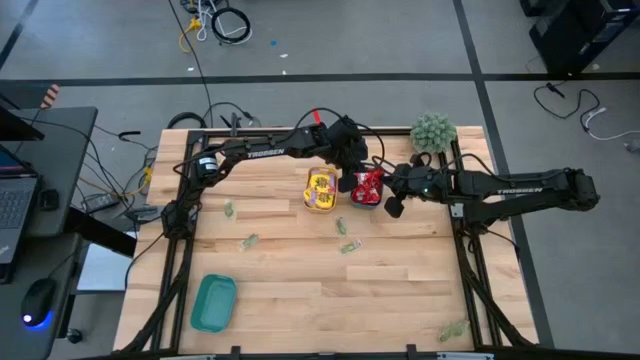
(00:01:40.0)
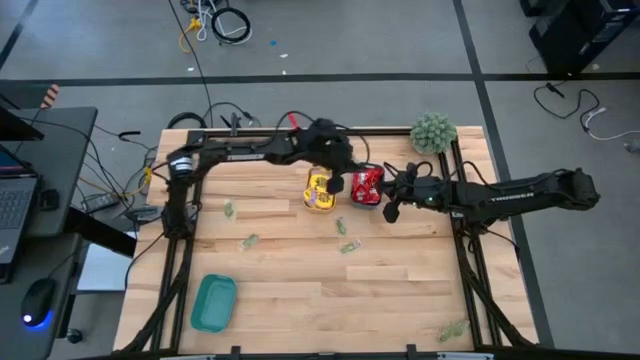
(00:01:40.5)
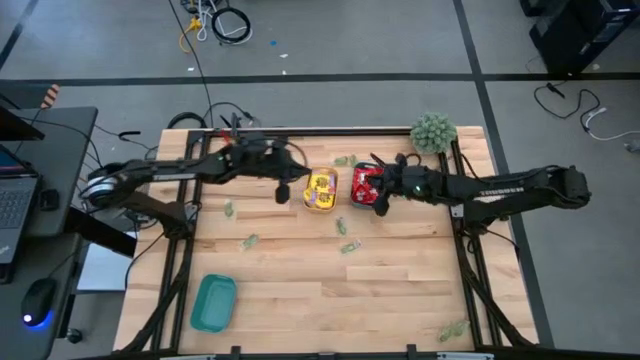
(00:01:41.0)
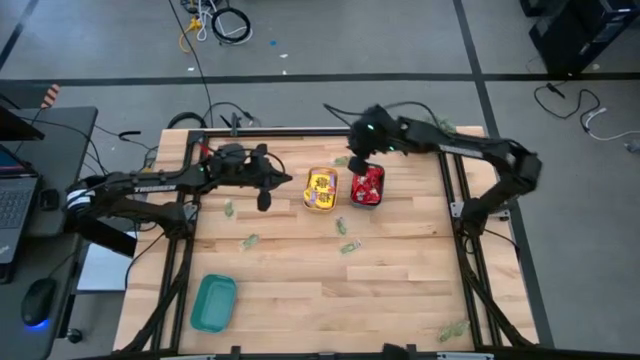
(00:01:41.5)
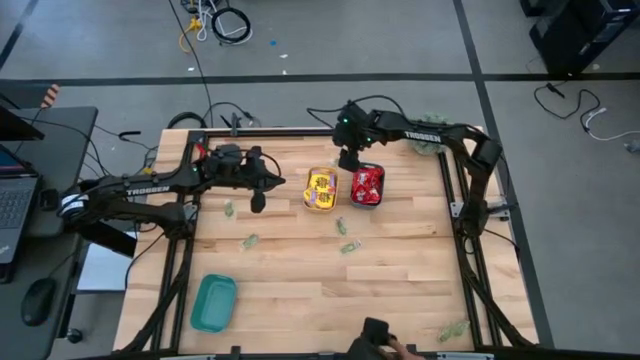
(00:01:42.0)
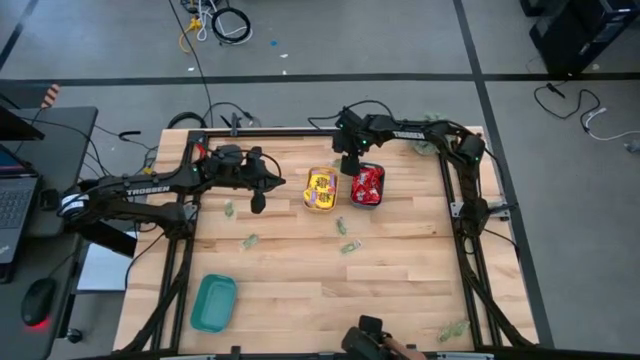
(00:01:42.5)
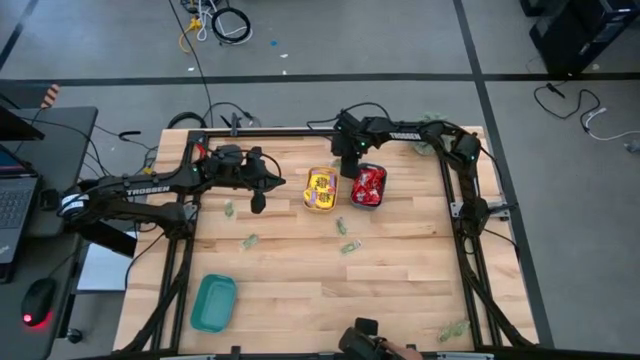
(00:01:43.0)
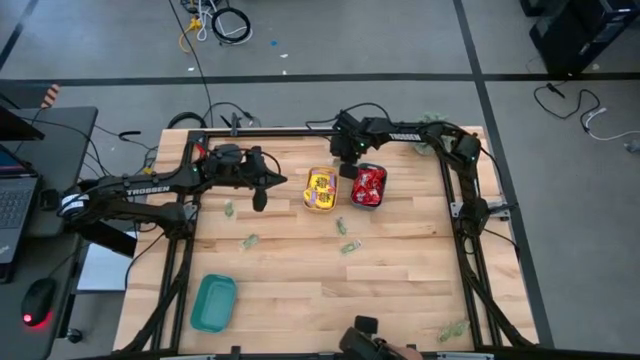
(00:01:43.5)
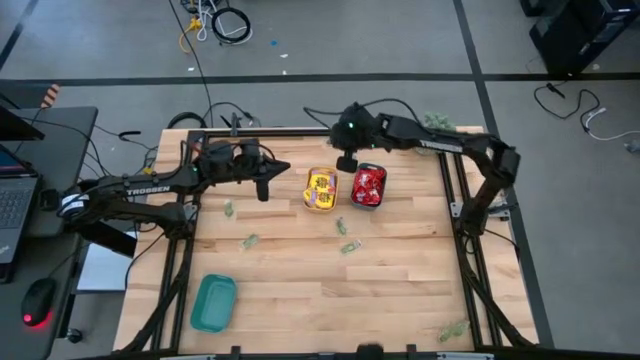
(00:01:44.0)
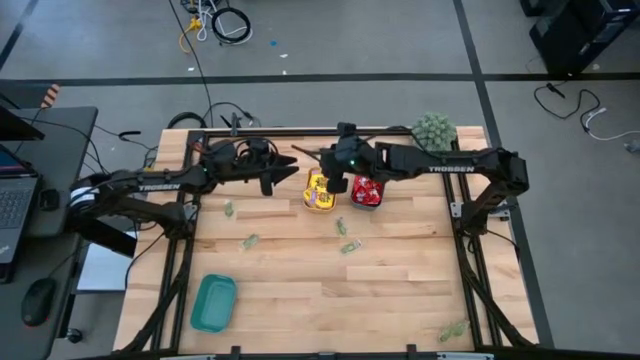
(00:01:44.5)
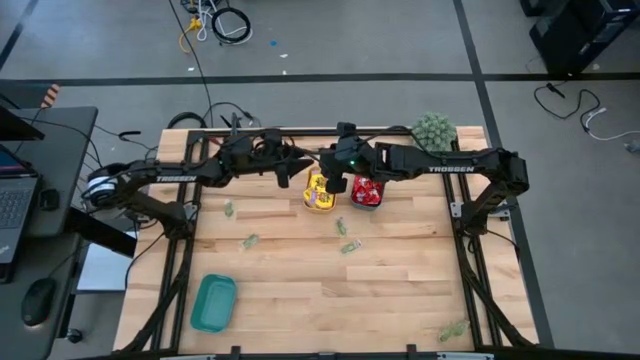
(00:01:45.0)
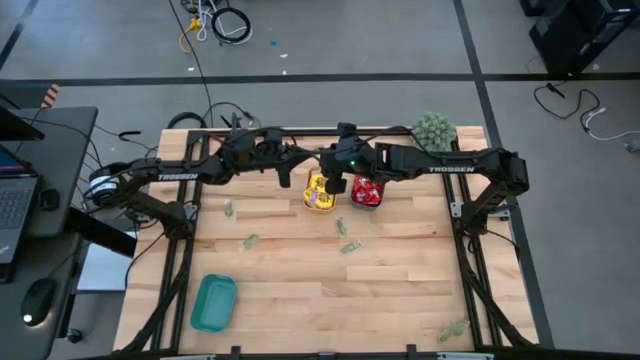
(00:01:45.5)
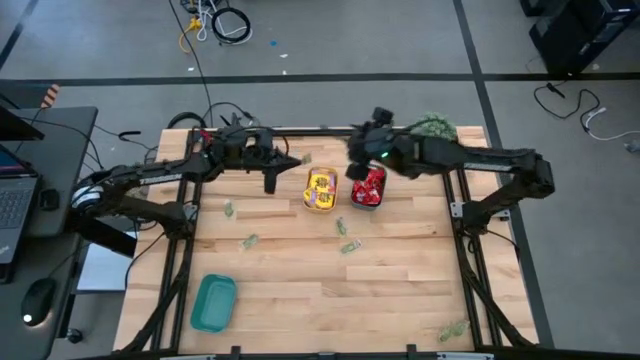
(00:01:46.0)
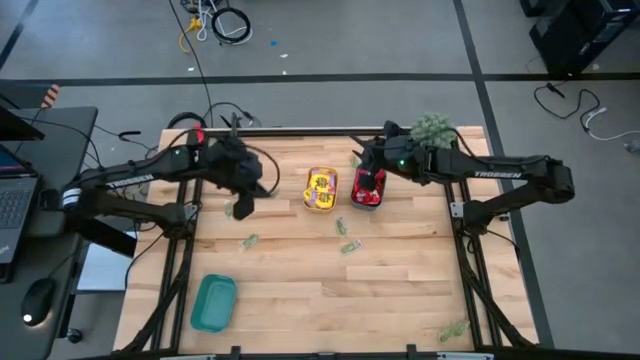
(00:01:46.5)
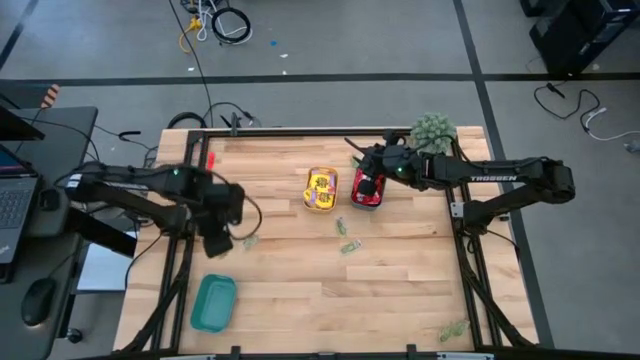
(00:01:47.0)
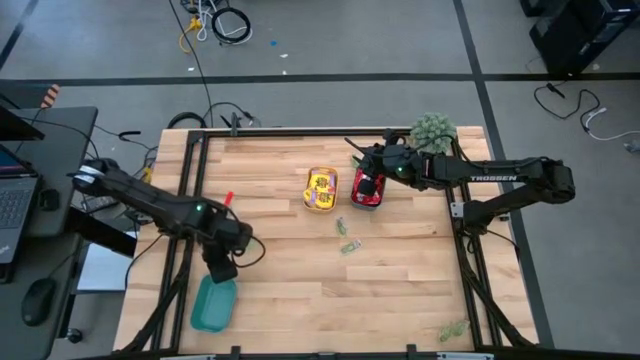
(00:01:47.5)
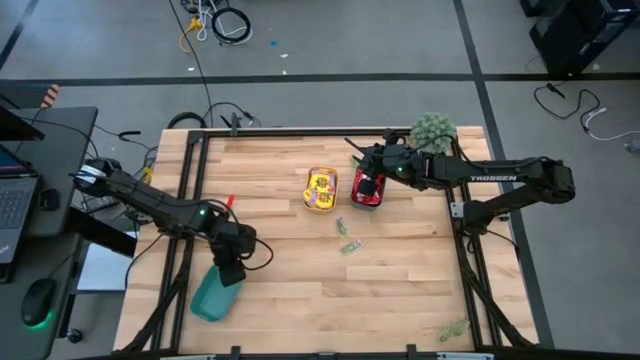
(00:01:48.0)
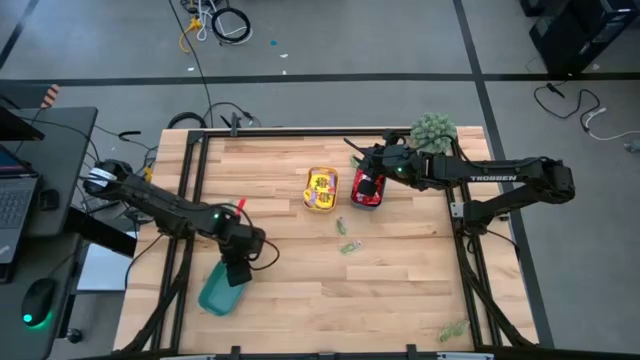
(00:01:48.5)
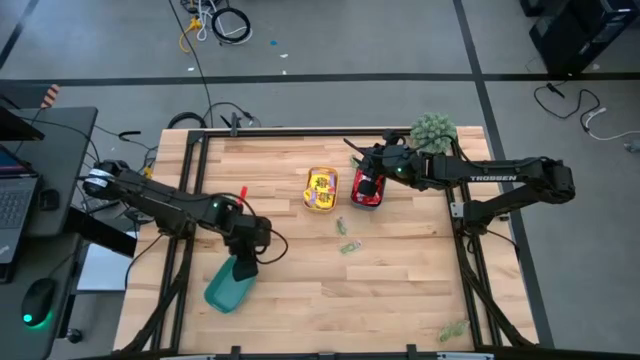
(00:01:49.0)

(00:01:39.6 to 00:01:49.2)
Task: Sort candy
Put the green gummy into the green bin

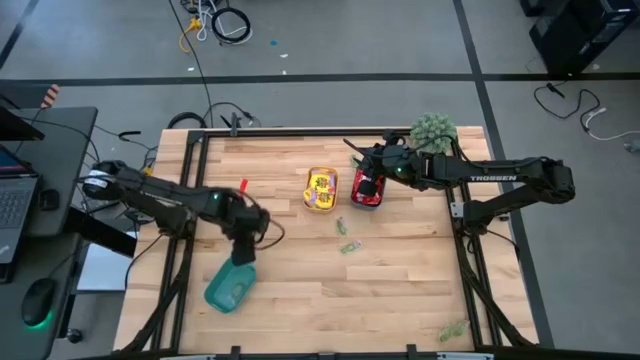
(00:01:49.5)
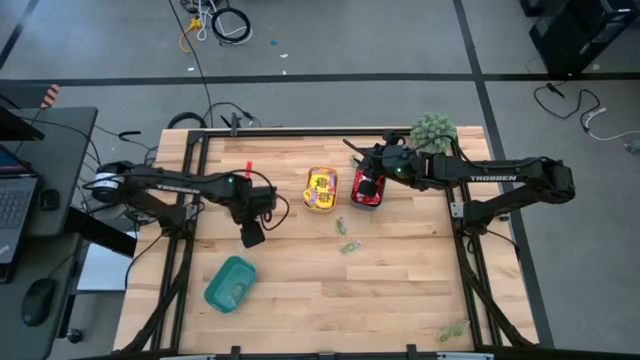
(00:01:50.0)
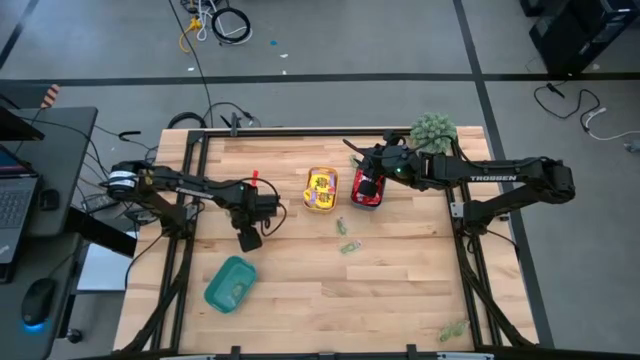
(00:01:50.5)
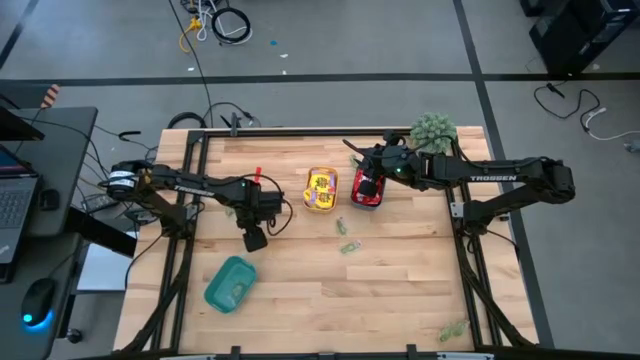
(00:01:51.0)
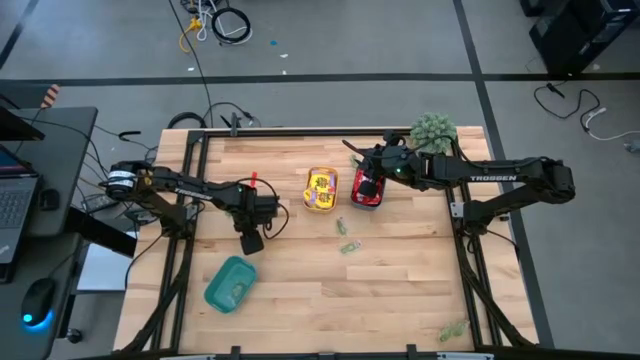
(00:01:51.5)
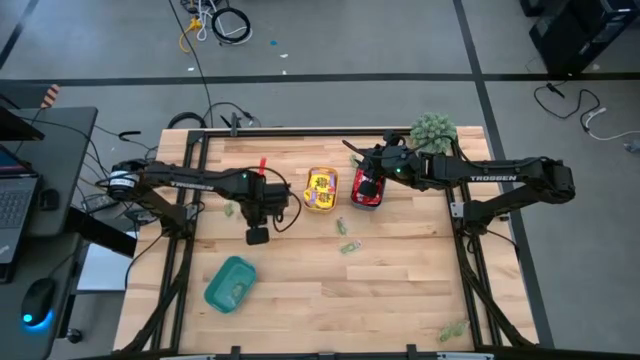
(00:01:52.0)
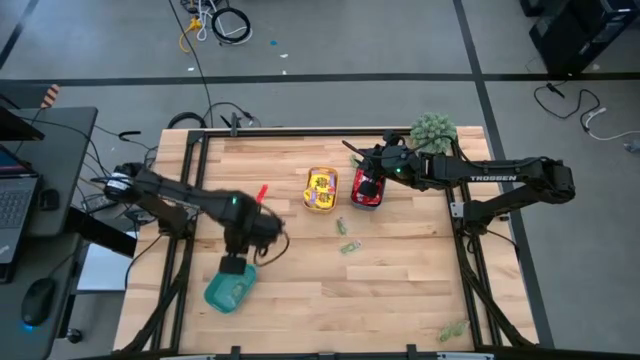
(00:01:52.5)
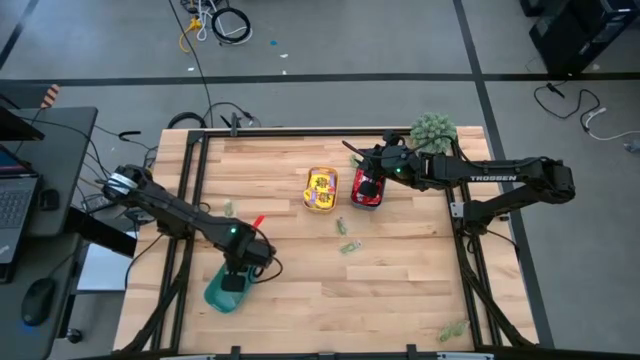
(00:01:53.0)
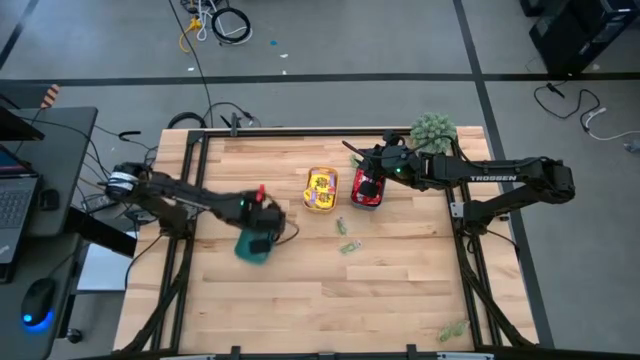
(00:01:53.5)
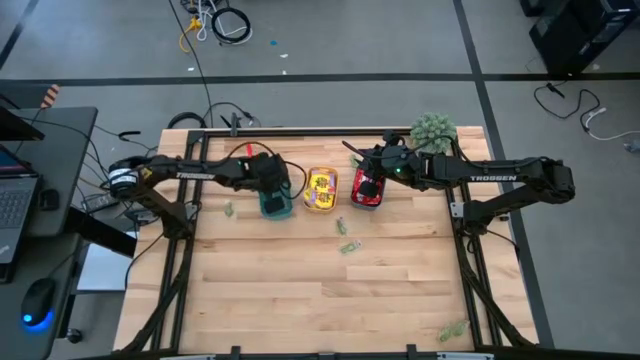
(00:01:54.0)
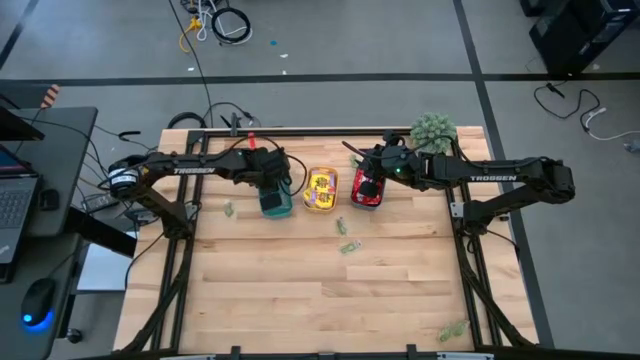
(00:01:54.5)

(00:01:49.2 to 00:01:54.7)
Put the green gummy into the green bin

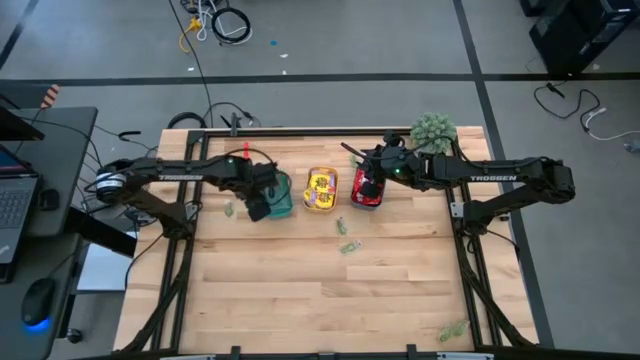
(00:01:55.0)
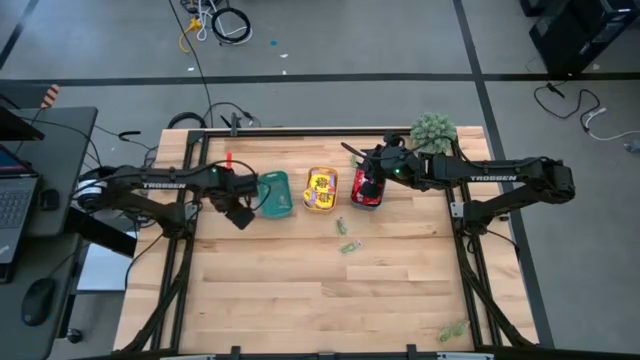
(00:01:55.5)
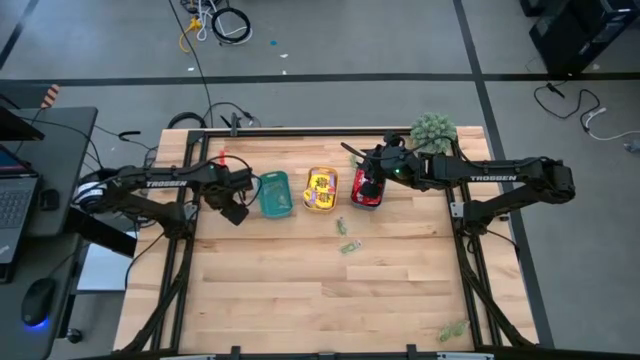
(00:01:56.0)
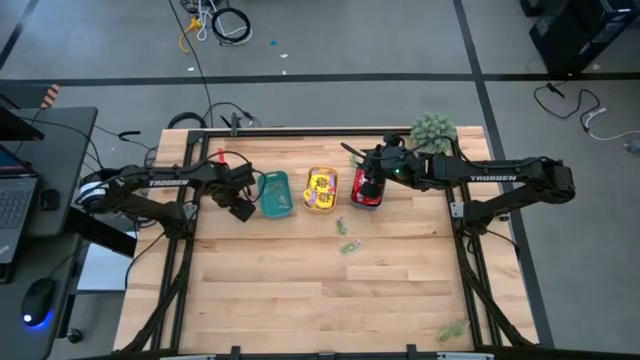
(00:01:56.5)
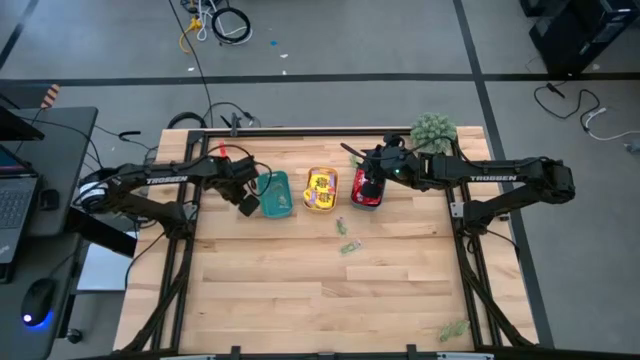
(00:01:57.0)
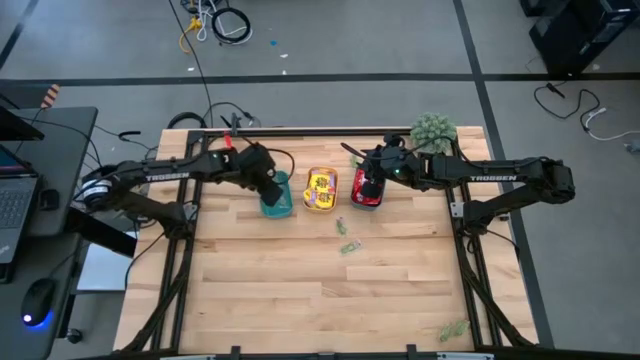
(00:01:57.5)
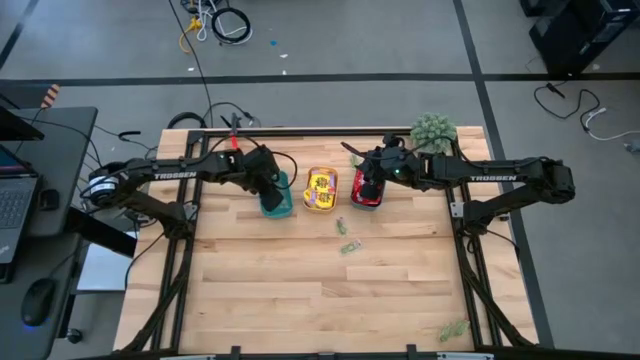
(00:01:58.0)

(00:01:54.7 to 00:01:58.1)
Put the green gummy into the green bin

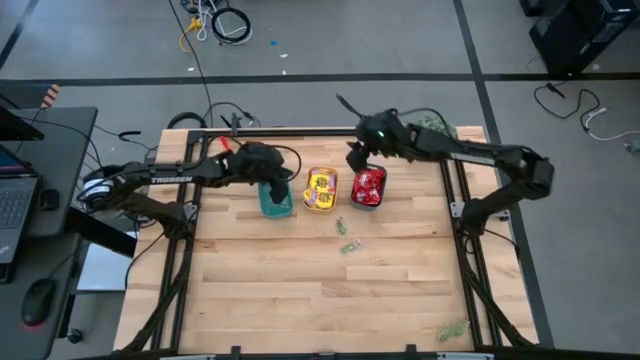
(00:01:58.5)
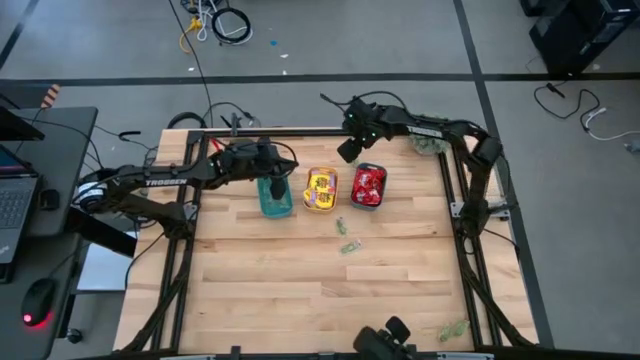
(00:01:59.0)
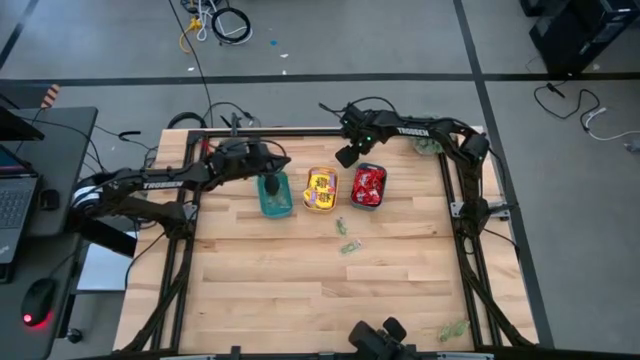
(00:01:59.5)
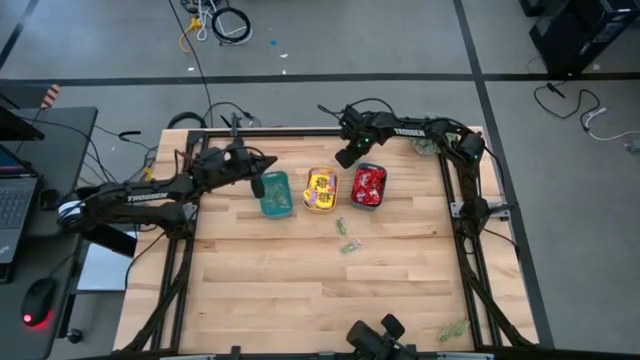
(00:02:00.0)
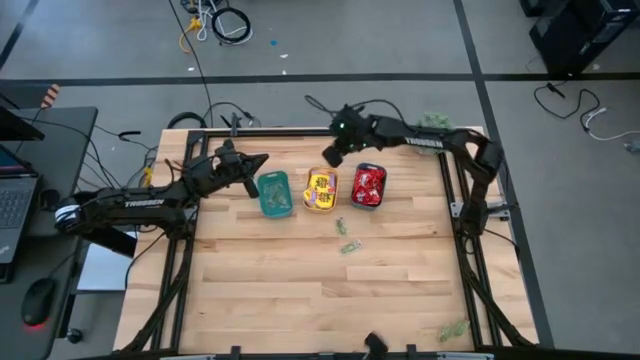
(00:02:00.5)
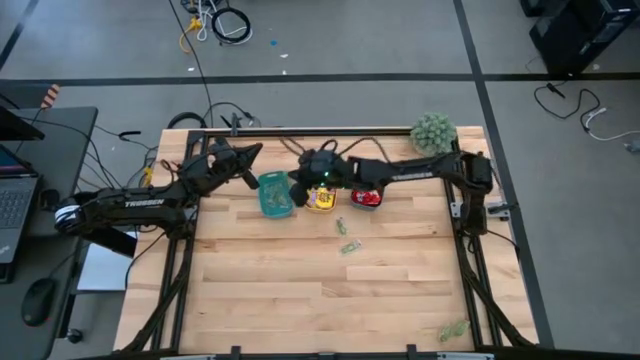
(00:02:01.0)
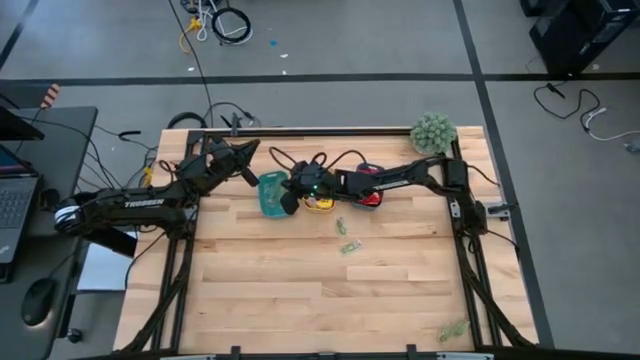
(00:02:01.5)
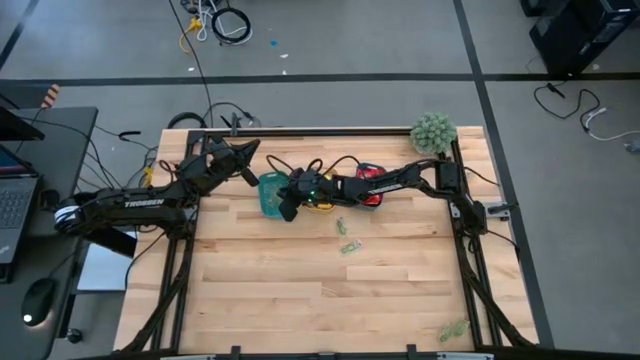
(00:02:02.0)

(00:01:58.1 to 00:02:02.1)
Put the green gummy into the green bin
